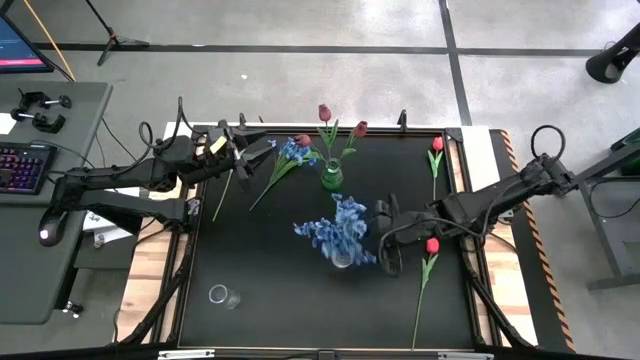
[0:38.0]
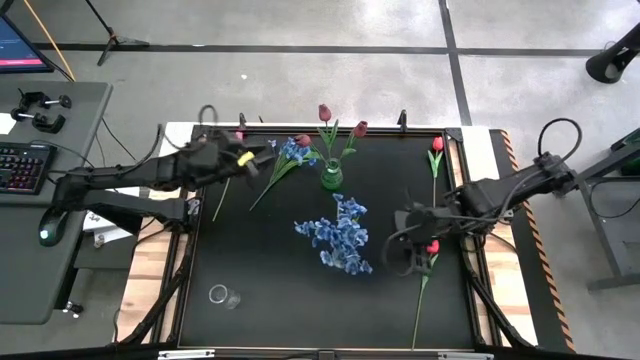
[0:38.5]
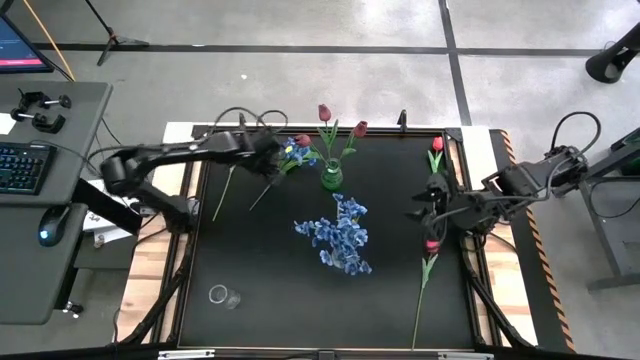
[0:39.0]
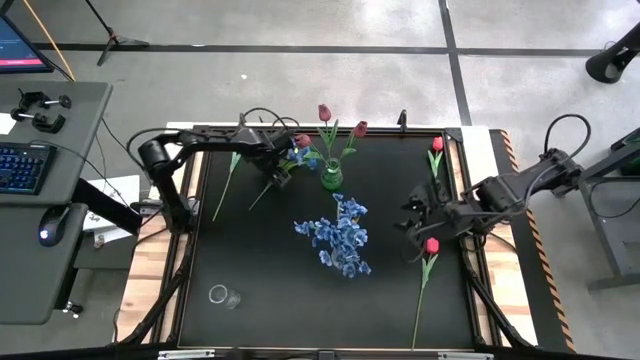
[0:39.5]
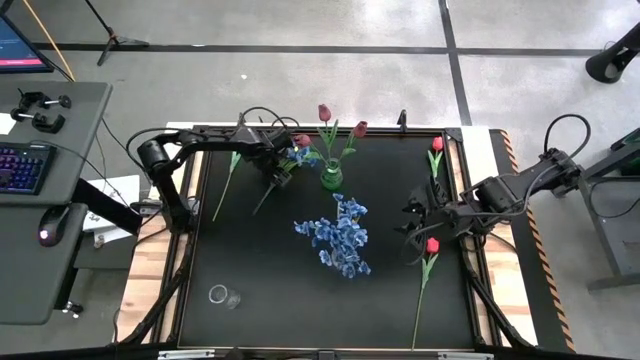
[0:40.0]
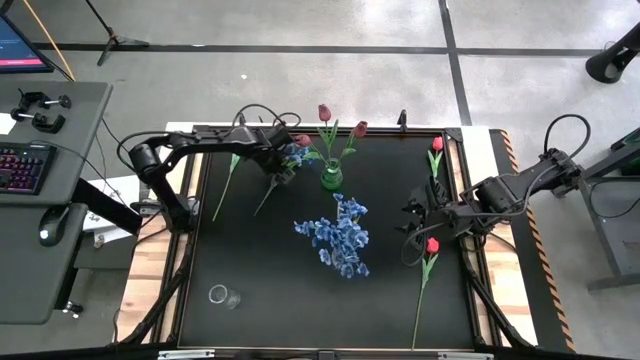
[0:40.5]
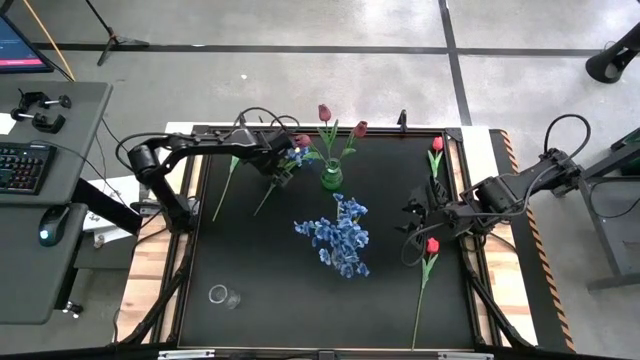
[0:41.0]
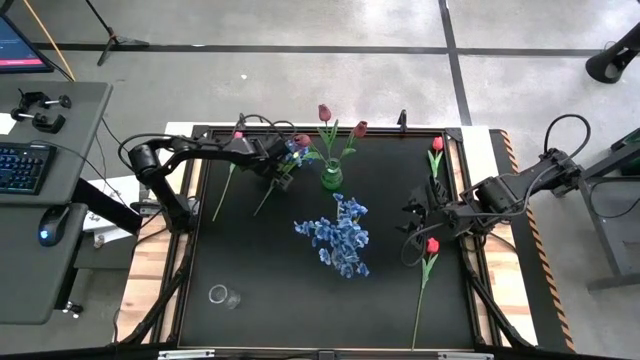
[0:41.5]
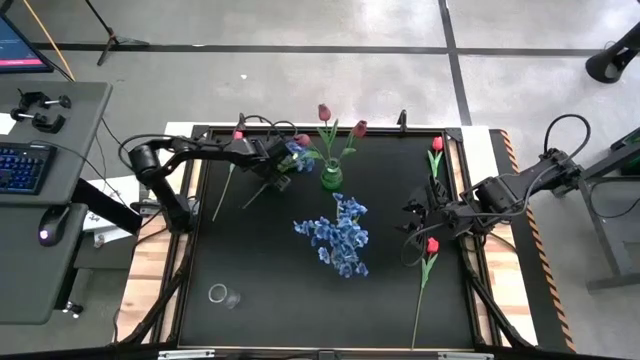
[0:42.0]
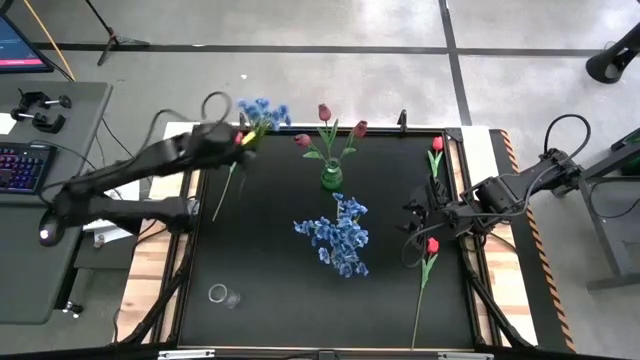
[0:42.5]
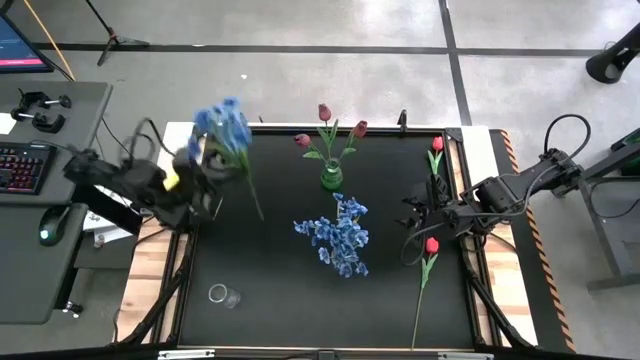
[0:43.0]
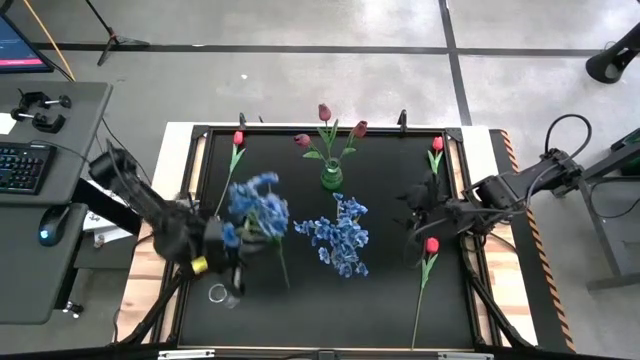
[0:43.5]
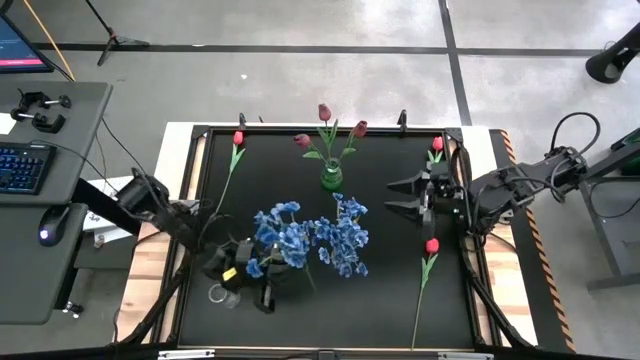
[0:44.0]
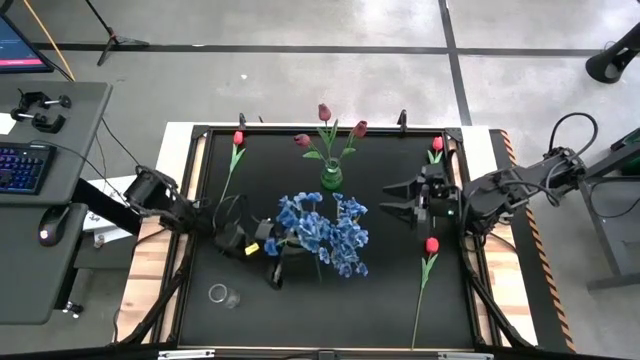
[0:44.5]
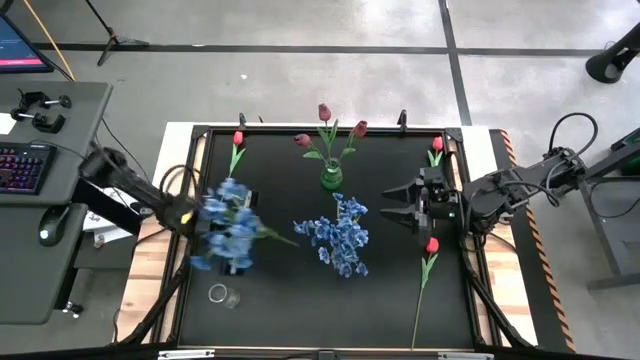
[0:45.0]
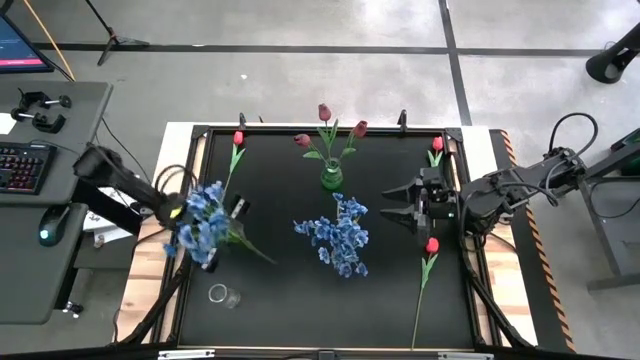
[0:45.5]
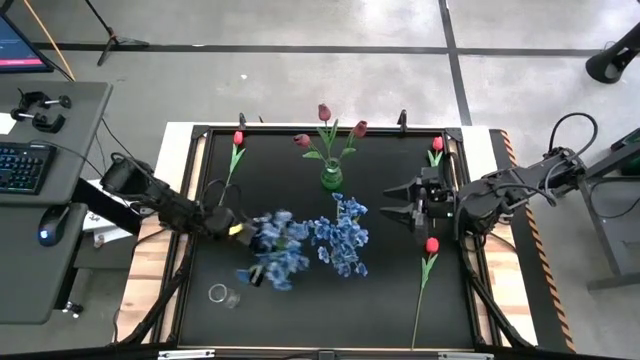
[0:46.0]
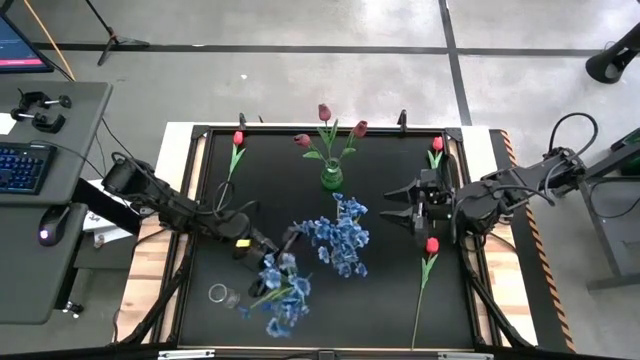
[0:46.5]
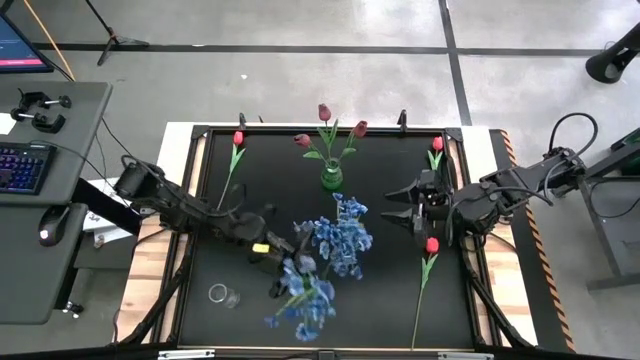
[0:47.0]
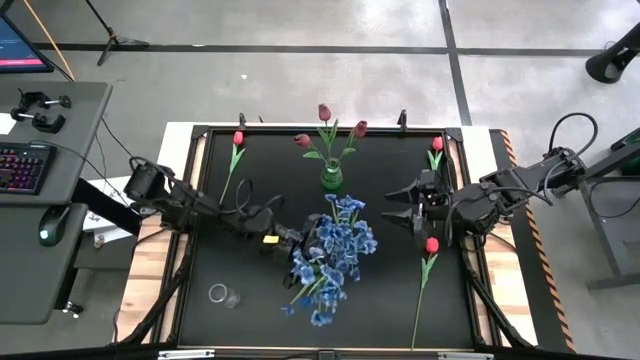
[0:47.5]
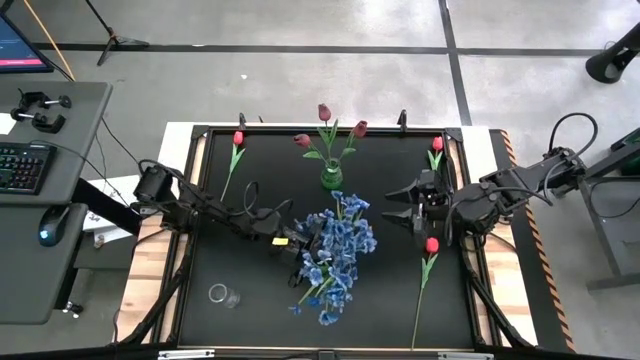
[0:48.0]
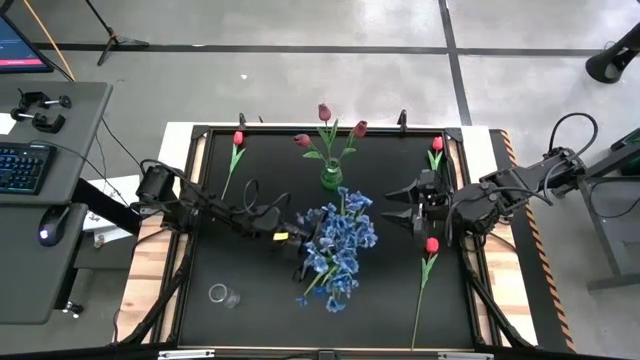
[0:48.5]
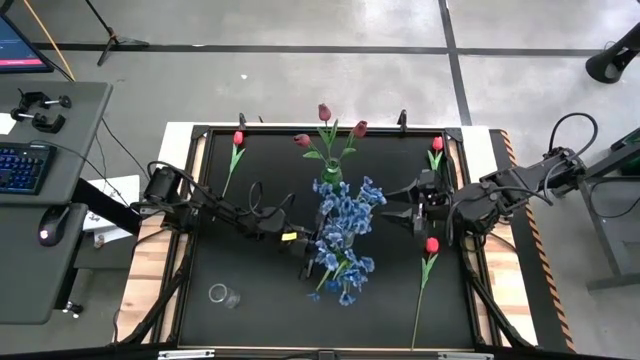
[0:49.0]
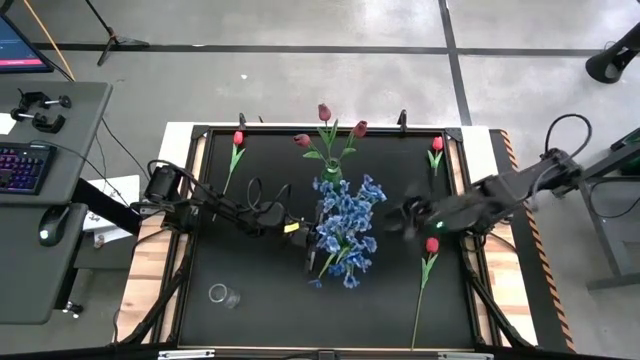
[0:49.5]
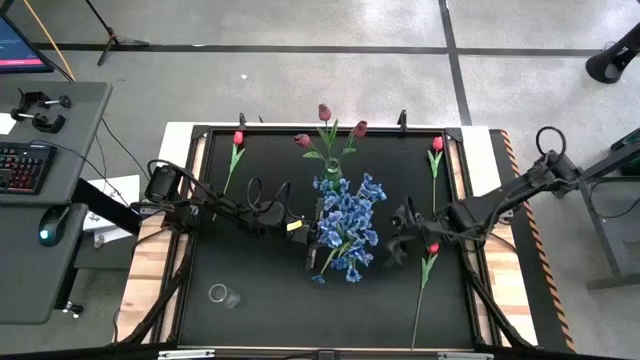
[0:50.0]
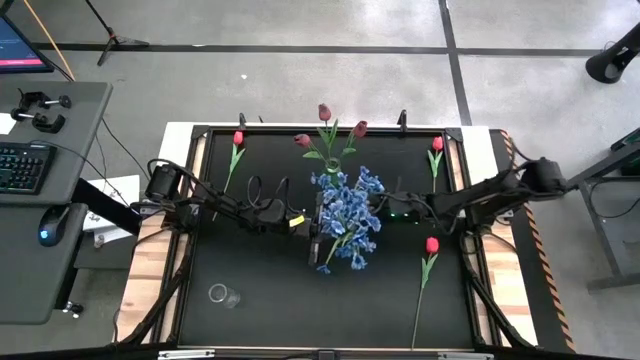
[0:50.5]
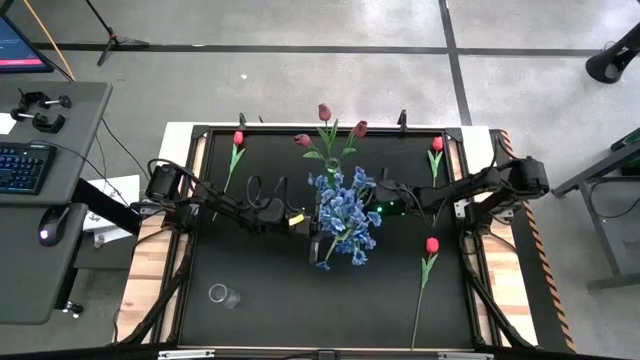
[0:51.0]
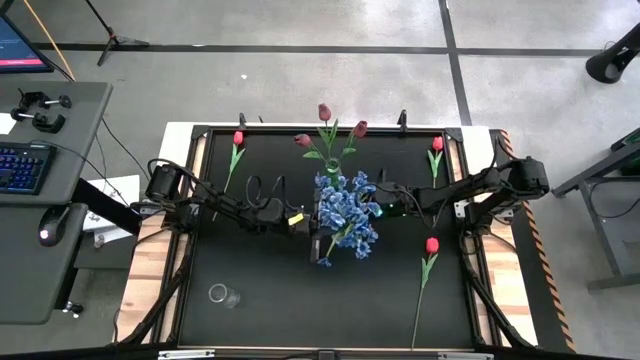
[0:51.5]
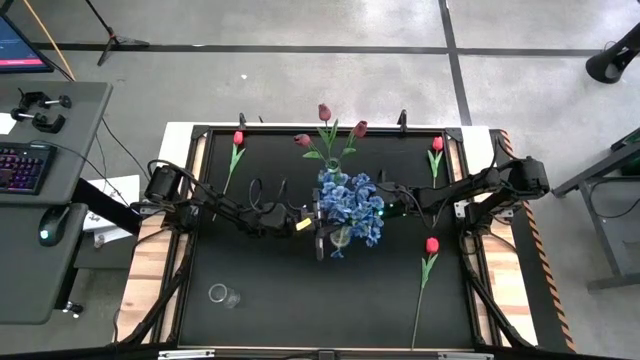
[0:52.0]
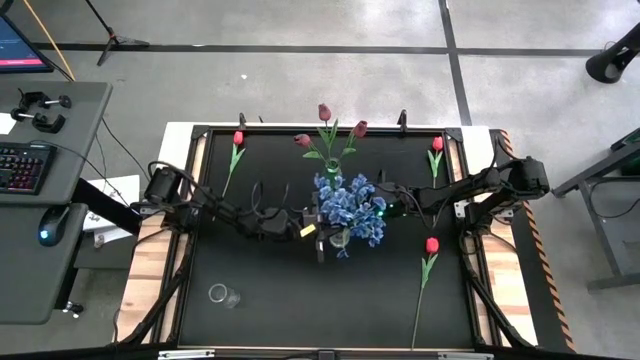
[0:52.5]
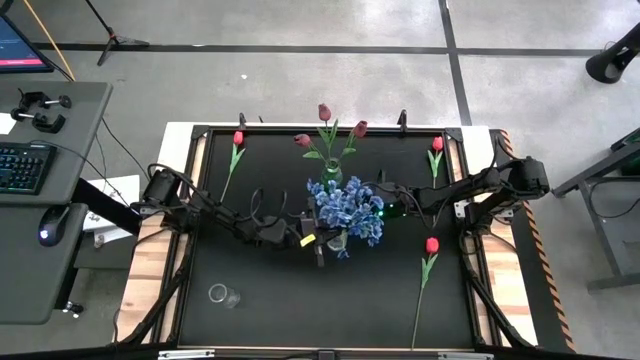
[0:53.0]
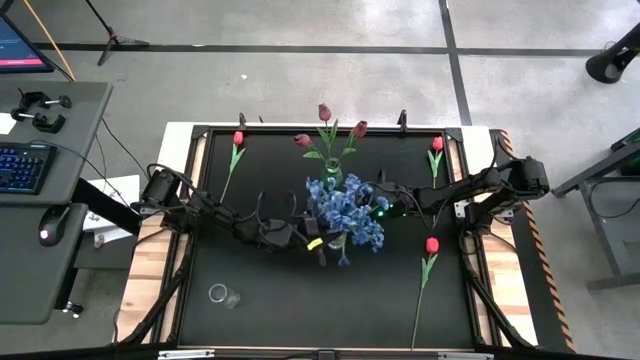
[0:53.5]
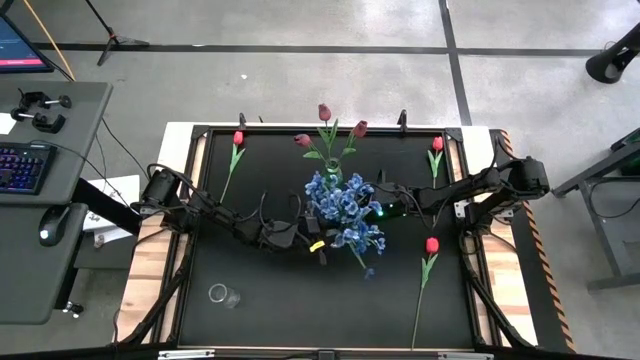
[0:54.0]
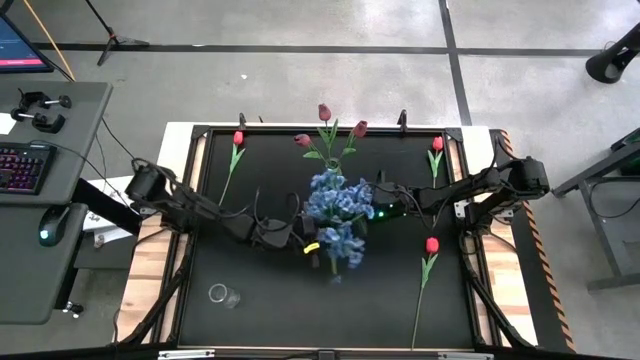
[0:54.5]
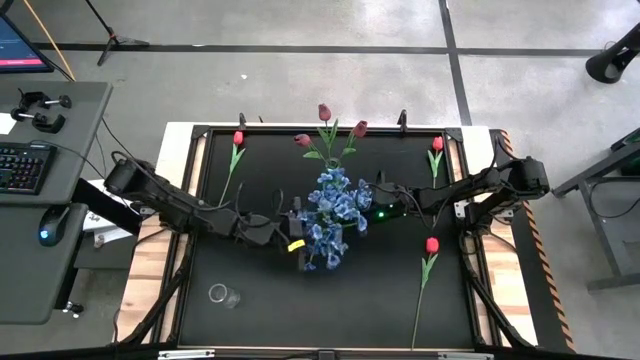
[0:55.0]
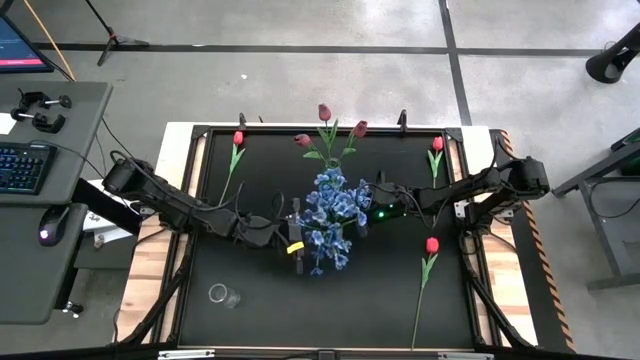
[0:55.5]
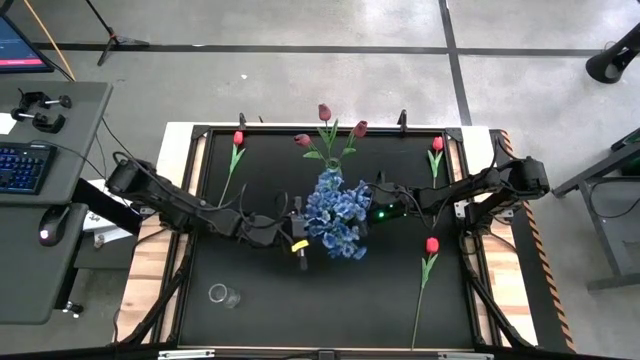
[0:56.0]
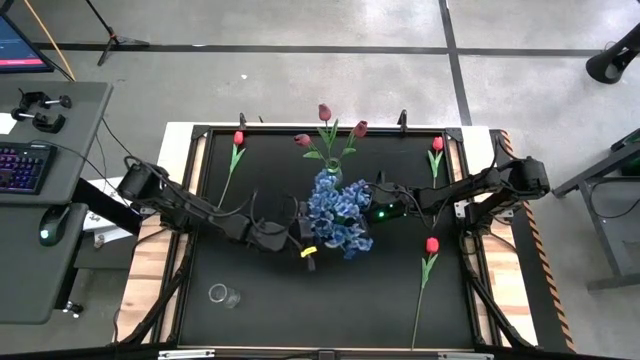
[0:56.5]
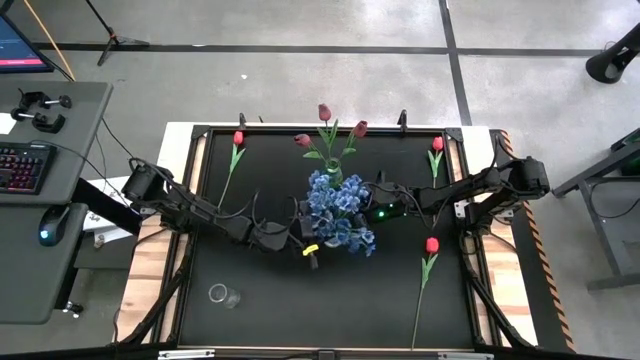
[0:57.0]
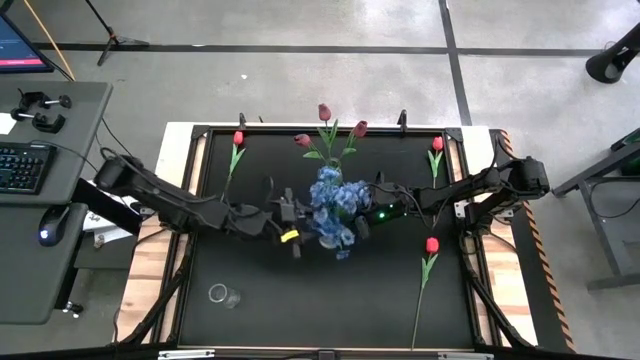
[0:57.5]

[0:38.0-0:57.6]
Task: Sort flowers into vase by color
Put the blue flowers into the right transparent vase

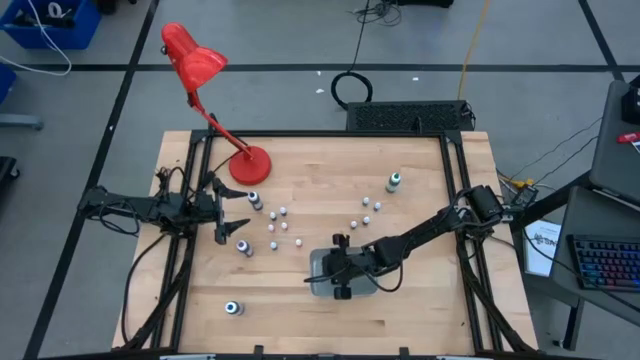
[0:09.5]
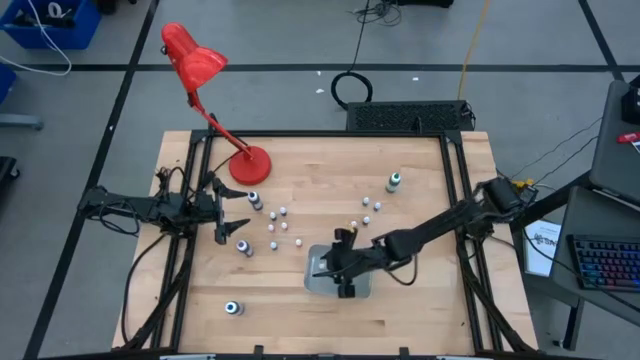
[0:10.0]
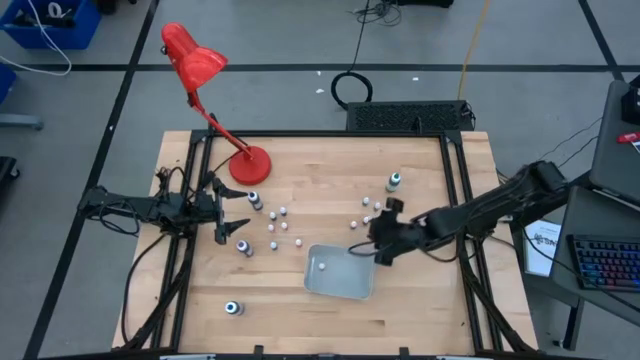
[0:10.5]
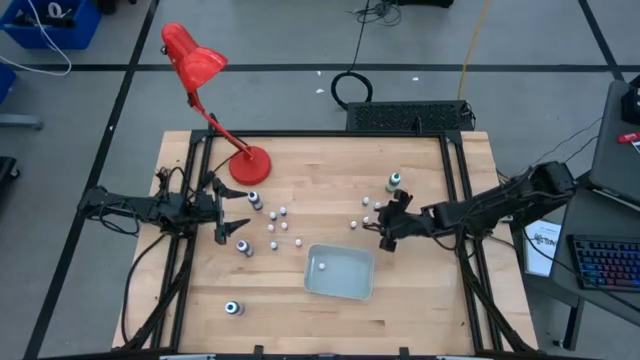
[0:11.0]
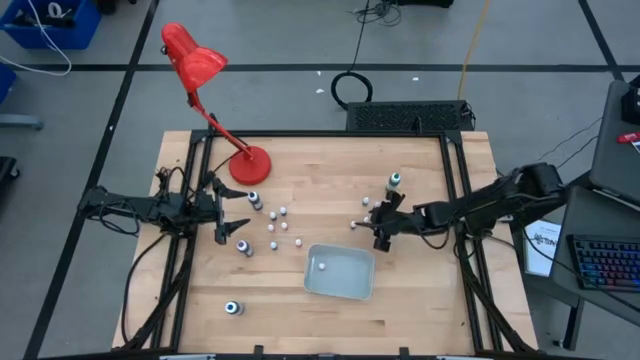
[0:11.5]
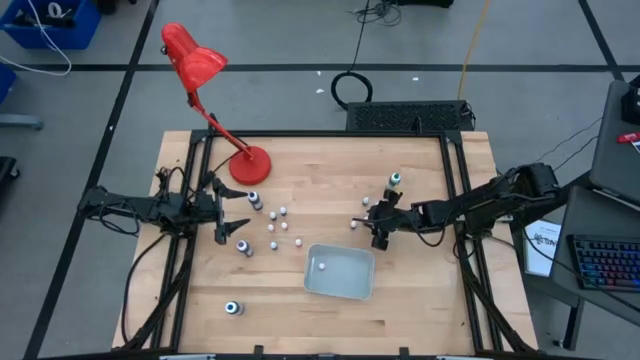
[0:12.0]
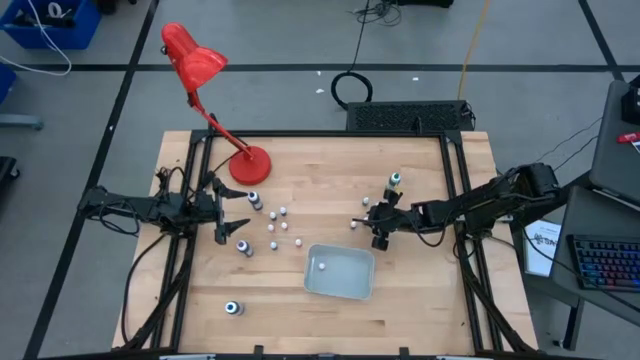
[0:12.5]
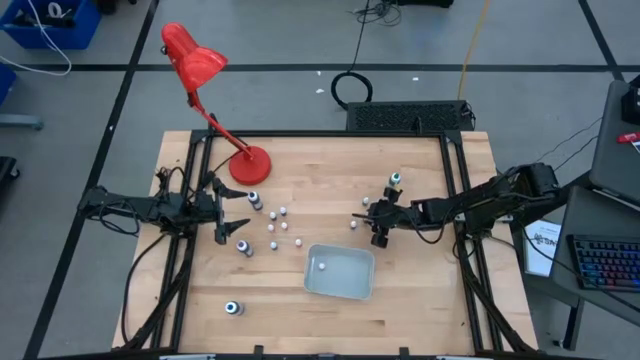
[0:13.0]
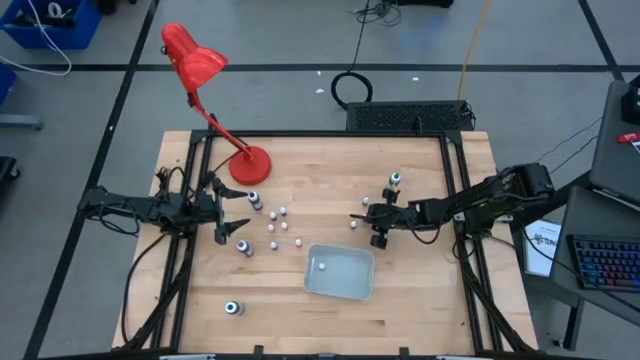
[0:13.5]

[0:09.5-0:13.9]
Task: Pick & Place food coloring
Put the small purple food coloring bottle into the gray bin
